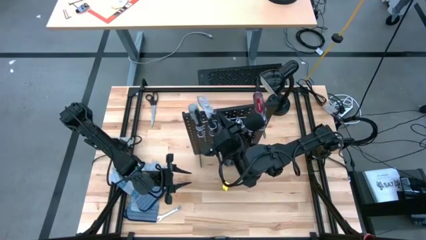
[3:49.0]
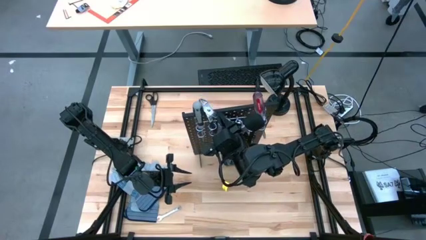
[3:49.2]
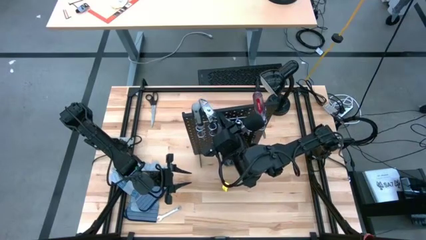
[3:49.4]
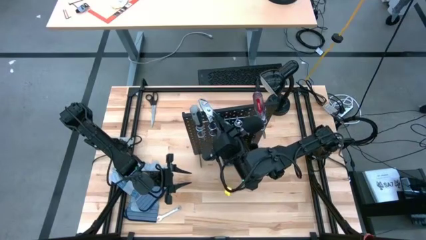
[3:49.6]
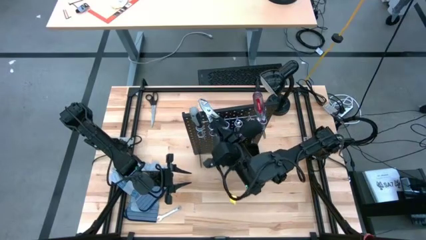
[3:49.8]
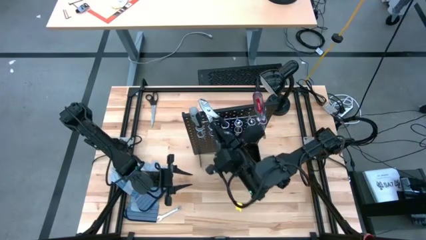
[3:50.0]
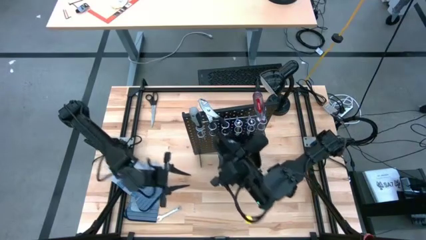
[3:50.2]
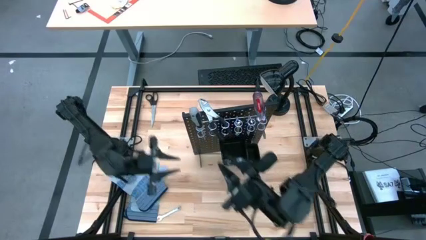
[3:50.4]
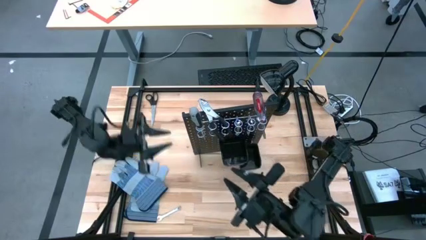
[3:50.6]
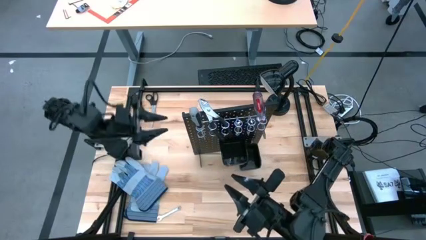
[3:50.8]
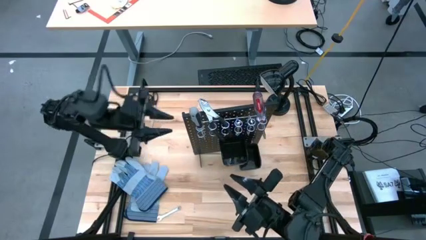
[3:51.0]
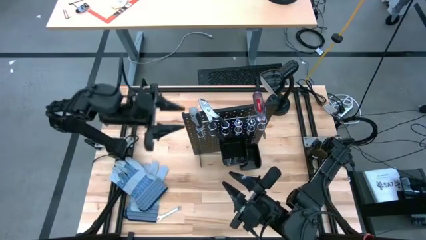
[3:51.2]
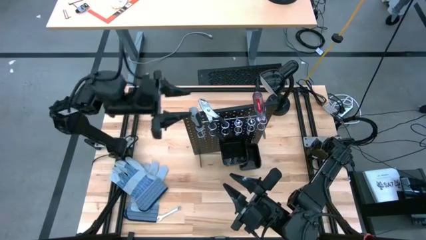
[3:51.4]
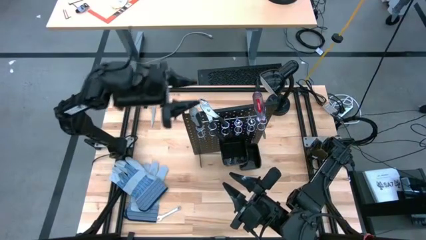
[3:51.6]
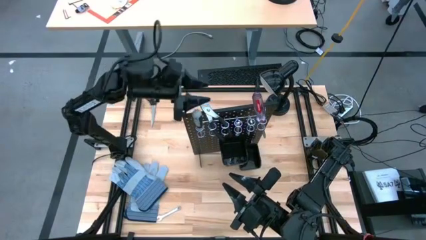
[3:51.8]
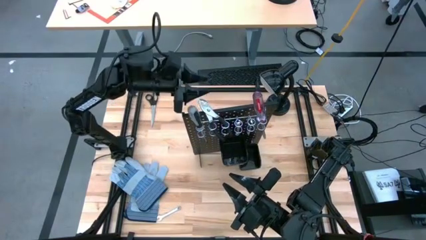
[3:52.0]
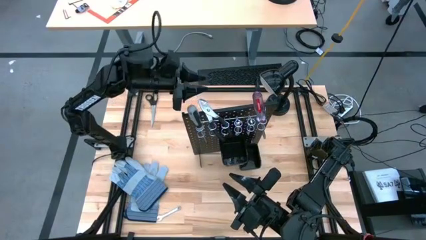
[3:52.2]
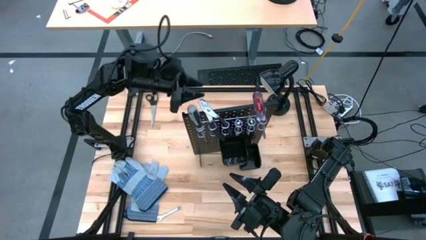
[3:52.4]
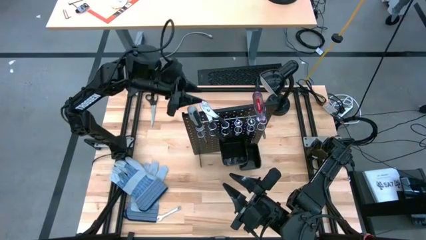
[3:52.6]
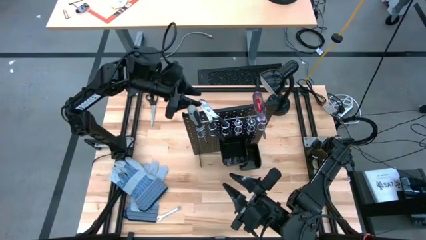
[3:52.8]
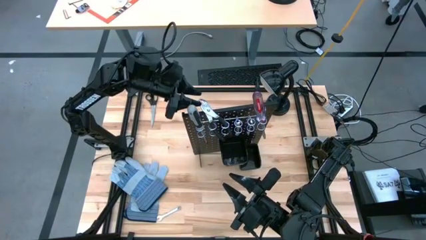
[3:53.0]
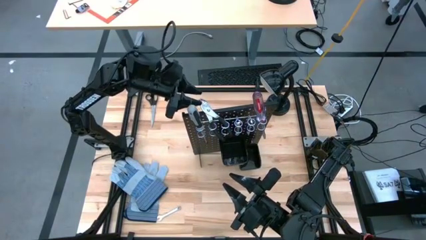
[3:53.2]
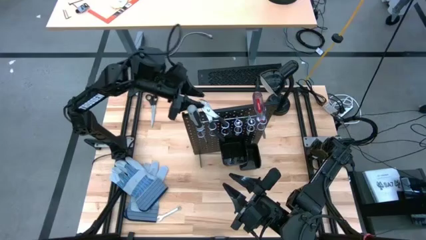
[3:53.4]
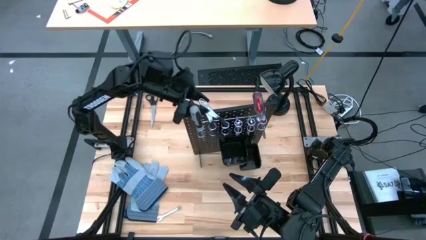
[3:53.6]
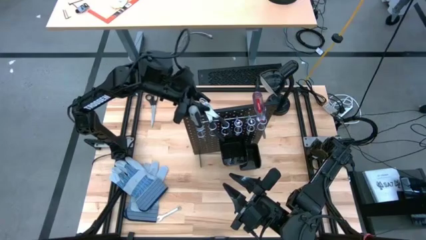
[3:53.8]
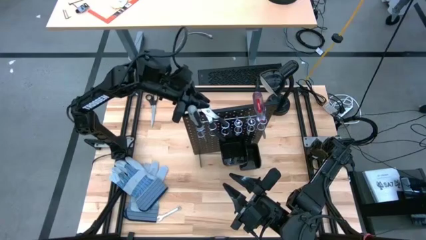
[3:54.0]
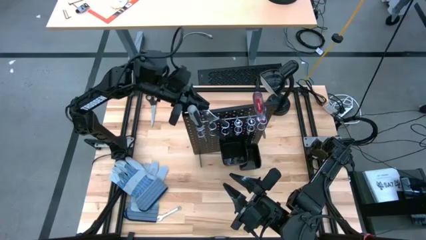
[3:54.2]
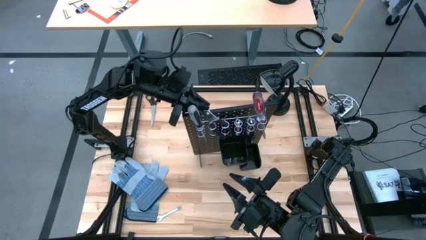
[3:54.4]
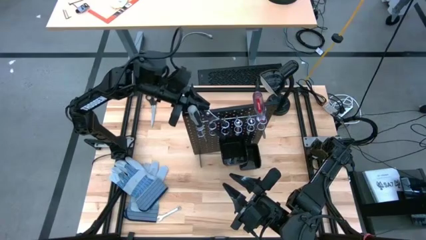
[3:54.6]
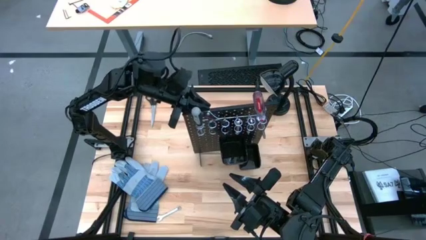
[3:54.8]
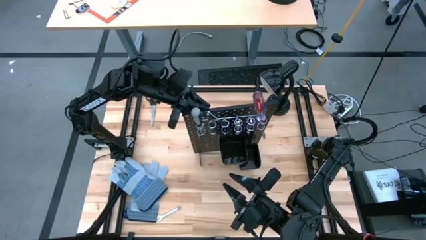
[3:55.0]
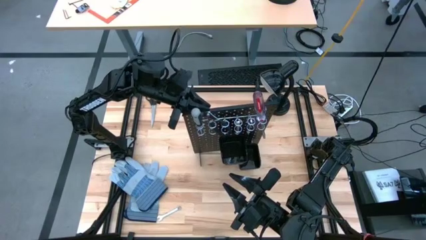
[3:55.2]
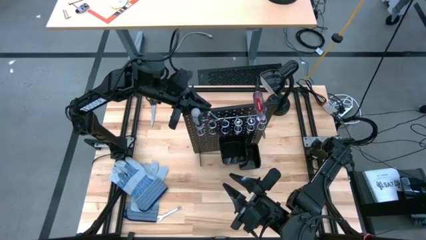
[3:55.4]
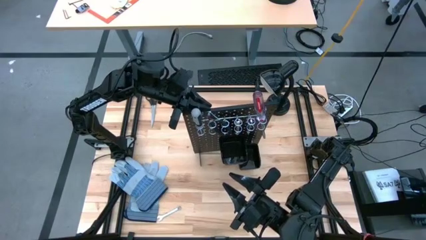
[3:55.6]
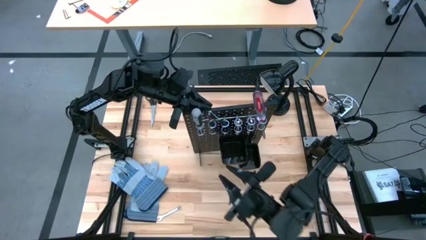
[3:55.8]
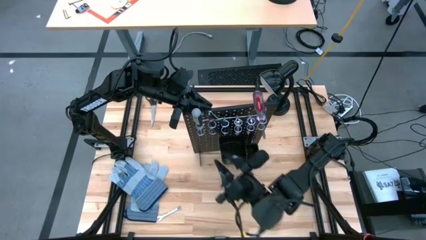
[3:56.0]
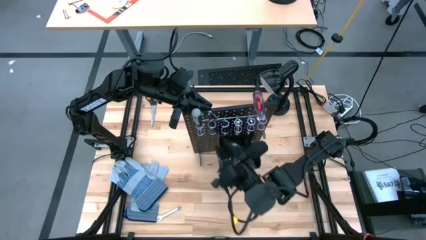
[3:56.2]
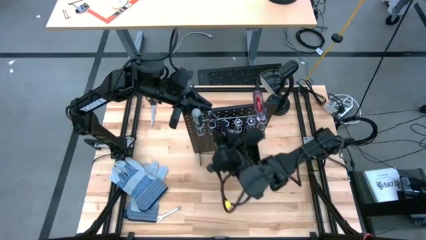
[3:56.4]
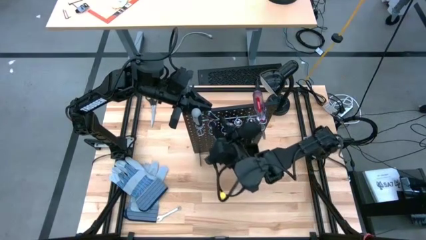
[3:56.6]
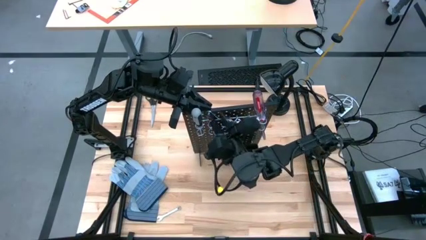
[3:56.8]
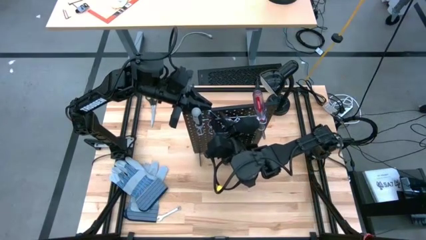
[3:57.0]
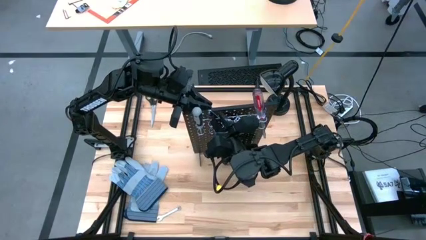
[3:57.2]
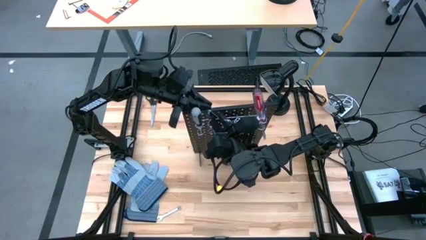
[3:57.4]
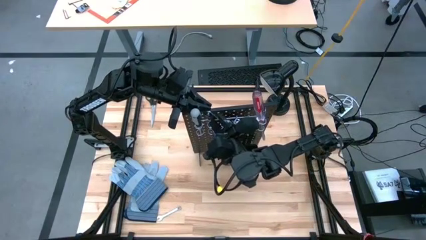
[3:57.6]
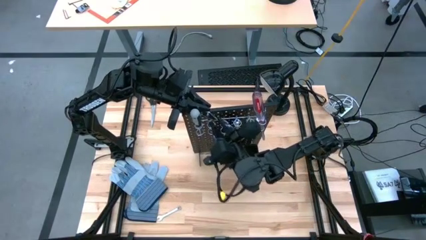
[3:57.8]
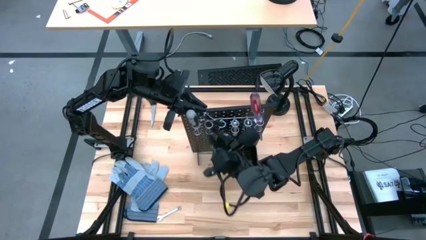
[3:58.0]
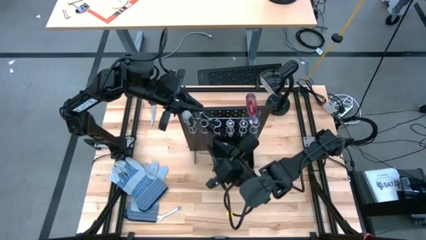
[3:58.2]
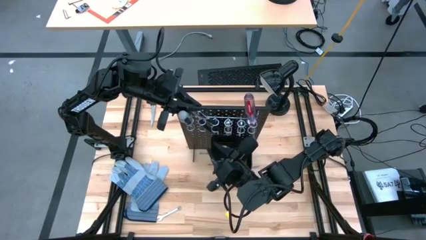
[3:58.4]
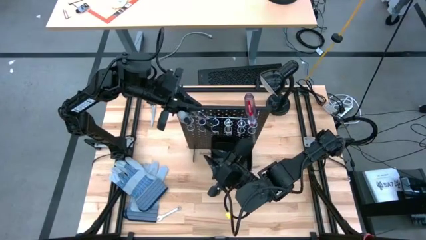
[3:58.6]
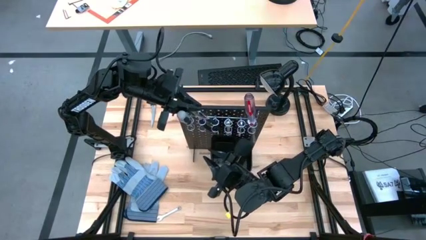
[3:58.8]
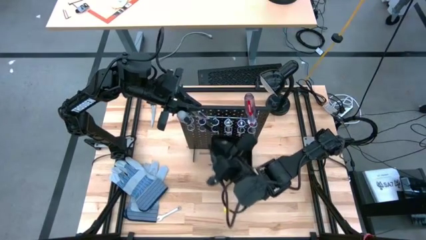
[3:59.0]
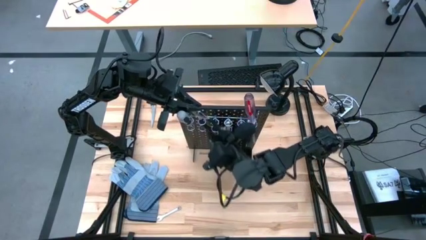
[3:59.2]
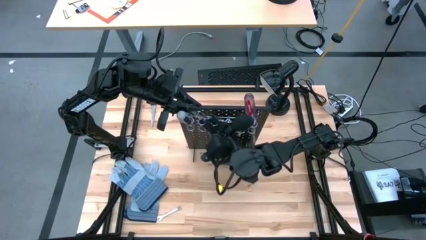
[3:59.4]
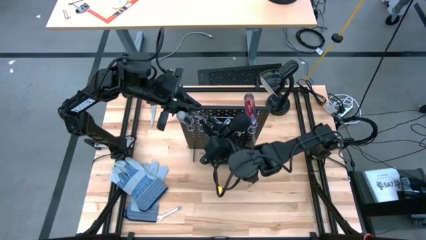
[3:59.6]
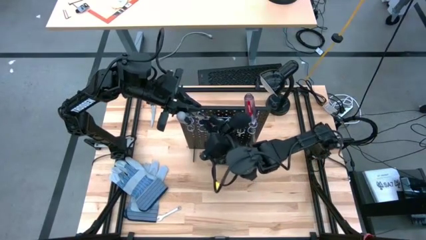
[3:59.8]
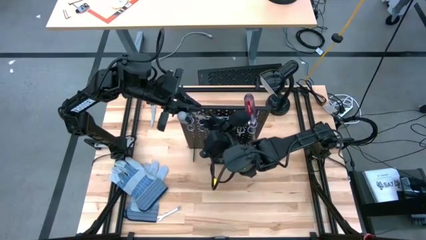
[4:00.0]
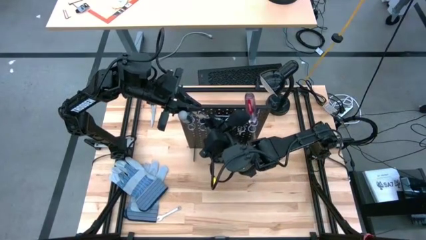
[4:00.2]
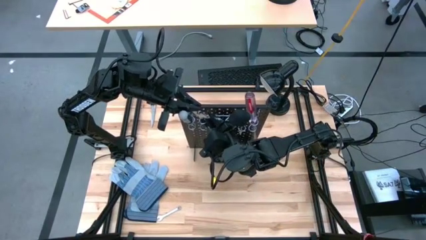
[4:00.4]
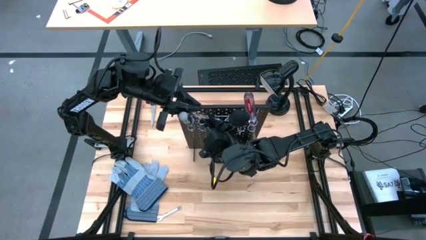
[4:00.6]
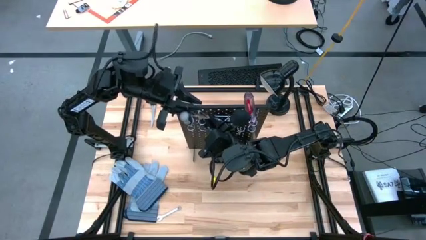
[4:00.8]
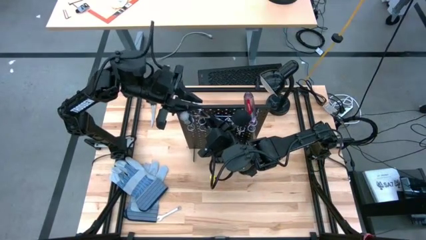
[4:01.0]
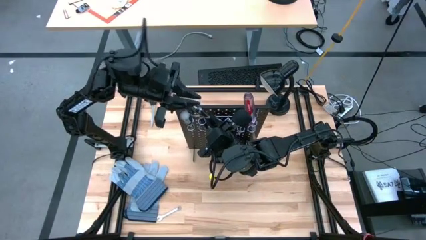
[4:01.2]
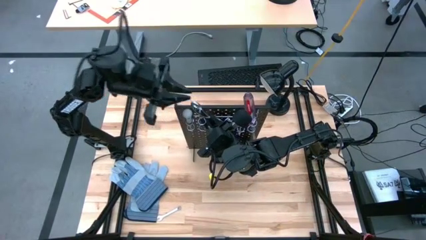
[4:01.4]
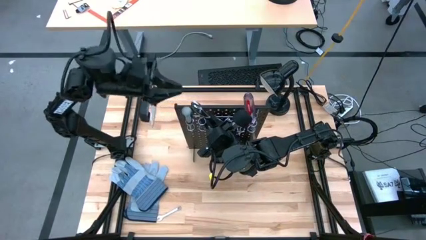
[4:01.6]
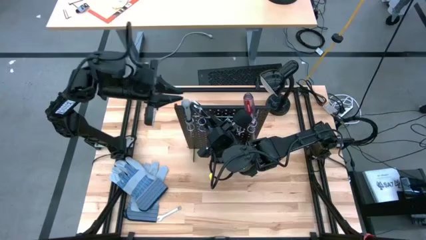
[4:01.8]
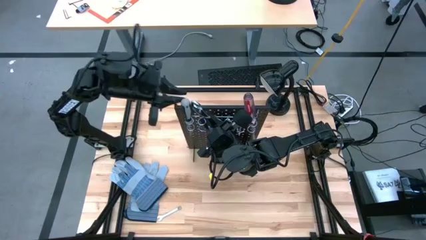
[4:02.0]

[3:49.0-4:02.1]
Task: Hang tools onto peg board
Unhang the black pliers from the black peg board
